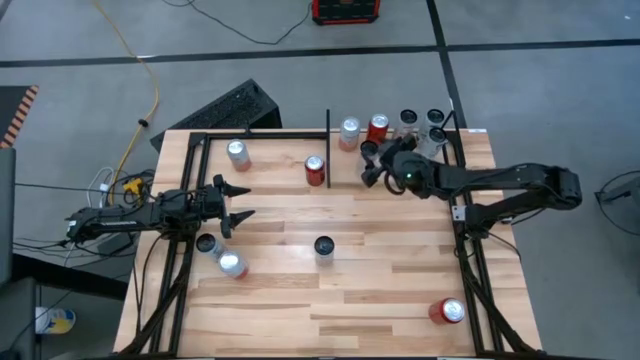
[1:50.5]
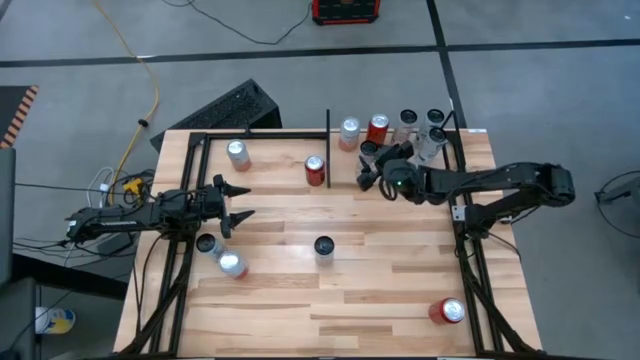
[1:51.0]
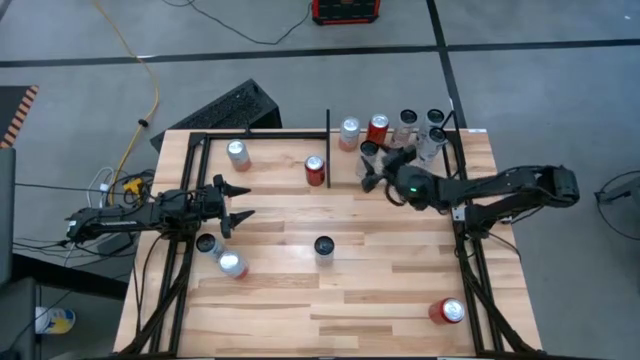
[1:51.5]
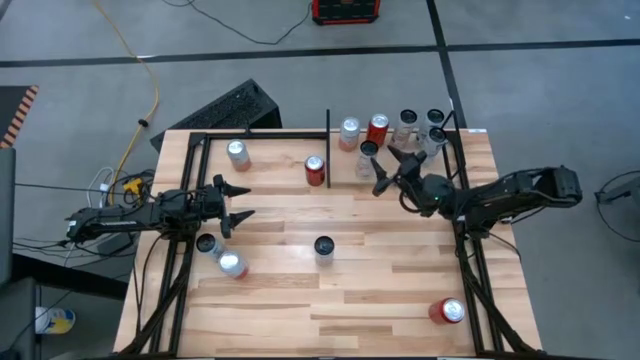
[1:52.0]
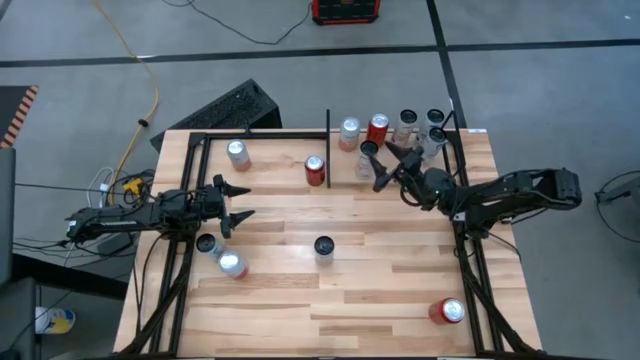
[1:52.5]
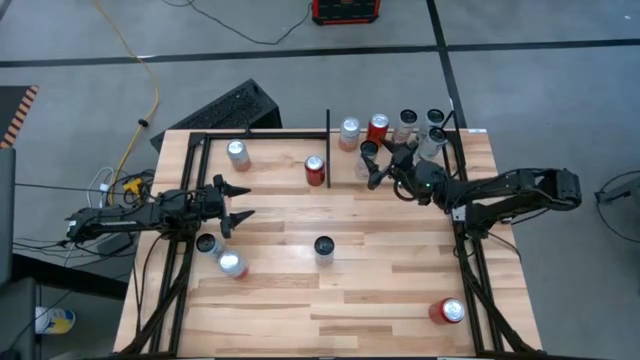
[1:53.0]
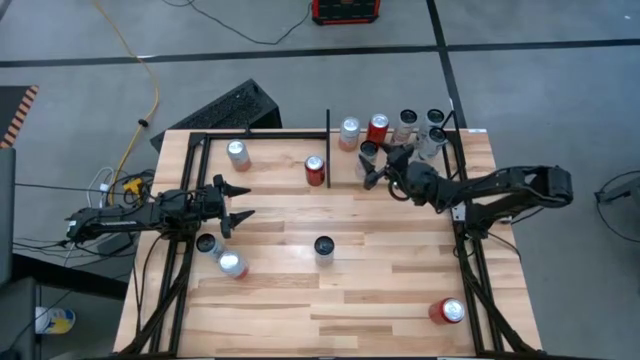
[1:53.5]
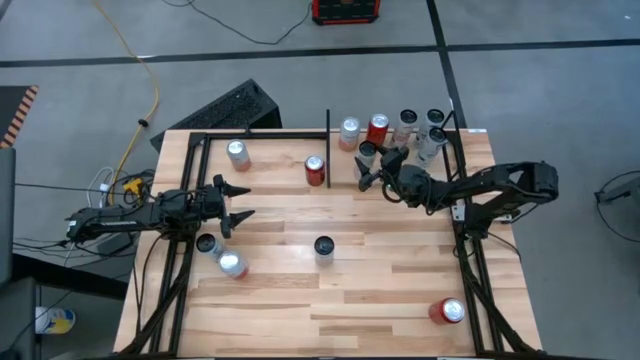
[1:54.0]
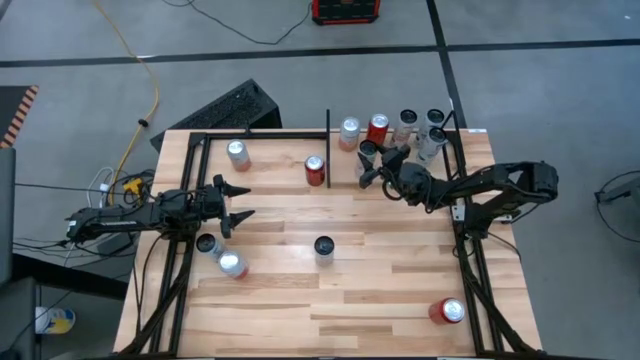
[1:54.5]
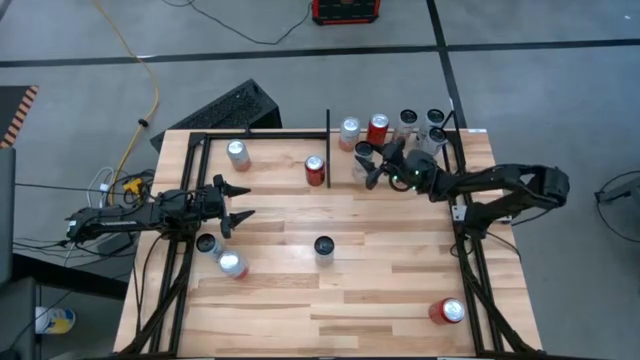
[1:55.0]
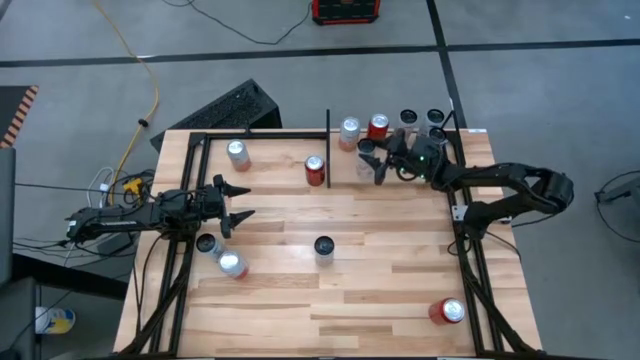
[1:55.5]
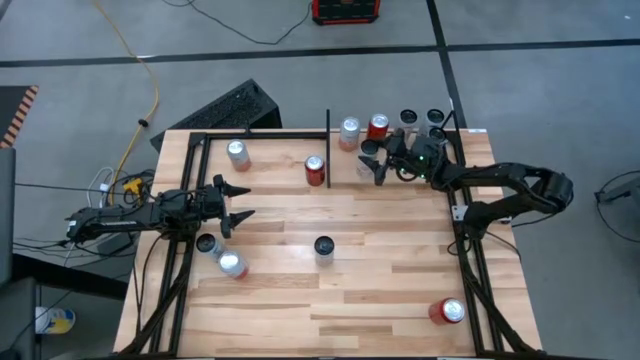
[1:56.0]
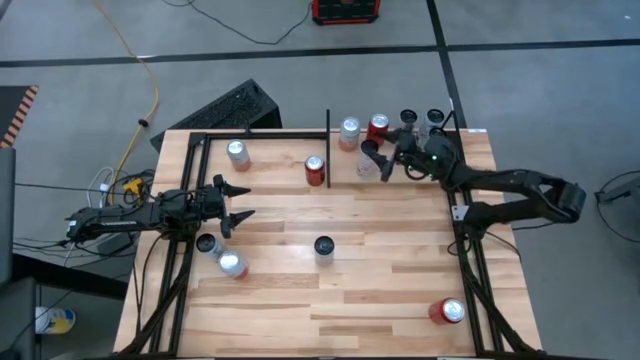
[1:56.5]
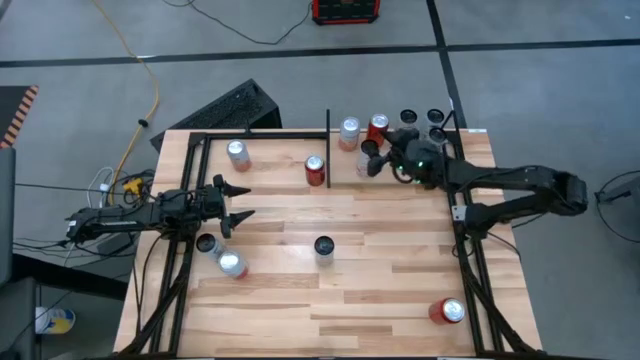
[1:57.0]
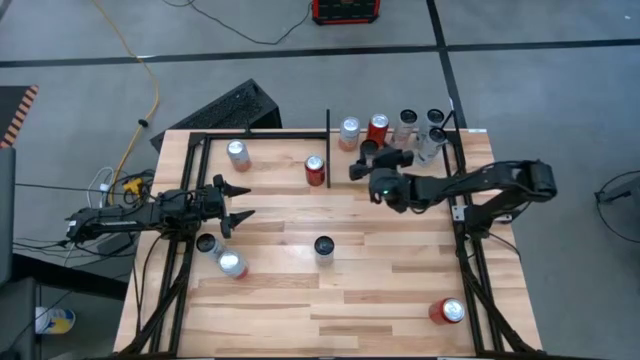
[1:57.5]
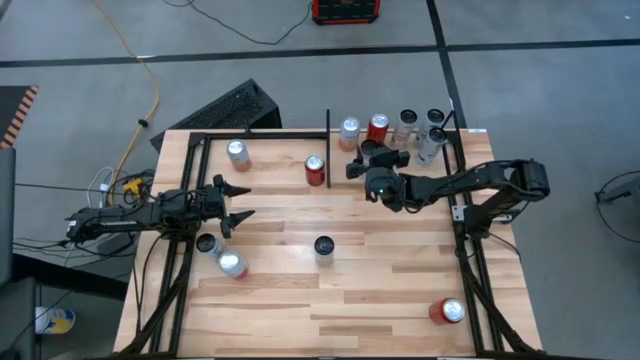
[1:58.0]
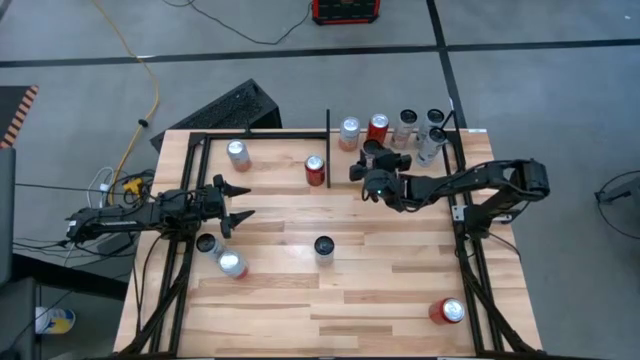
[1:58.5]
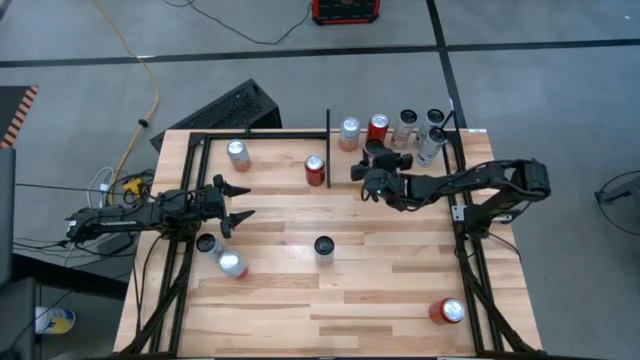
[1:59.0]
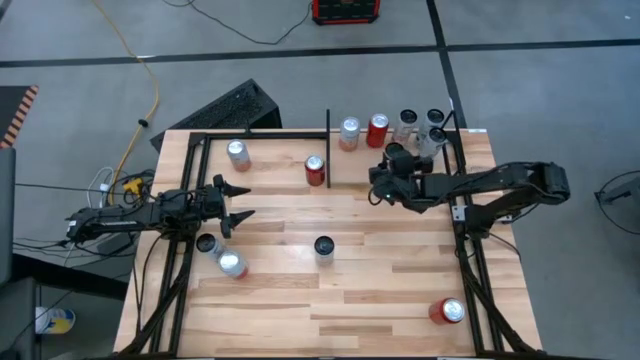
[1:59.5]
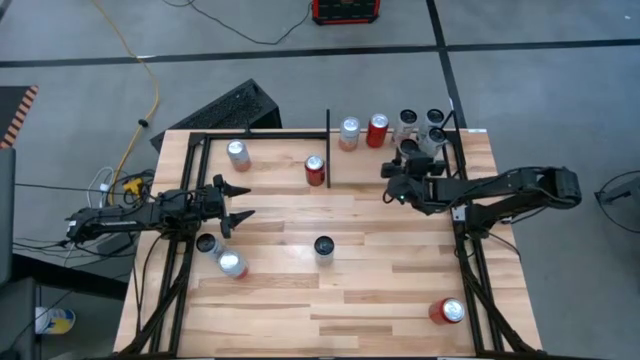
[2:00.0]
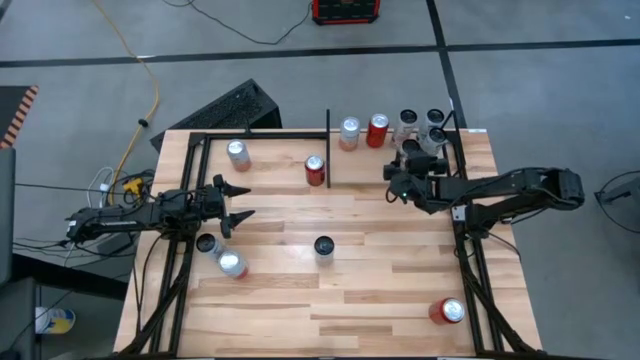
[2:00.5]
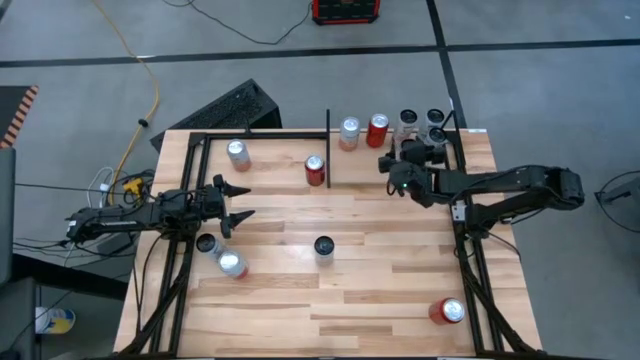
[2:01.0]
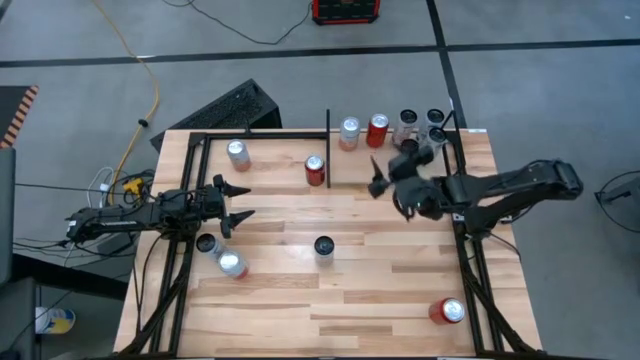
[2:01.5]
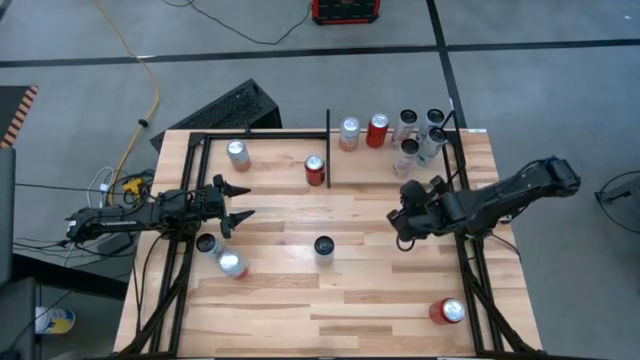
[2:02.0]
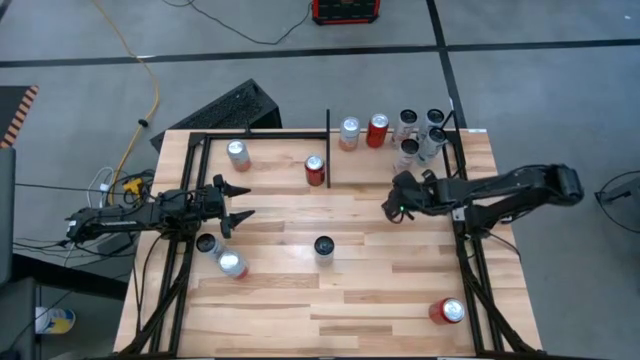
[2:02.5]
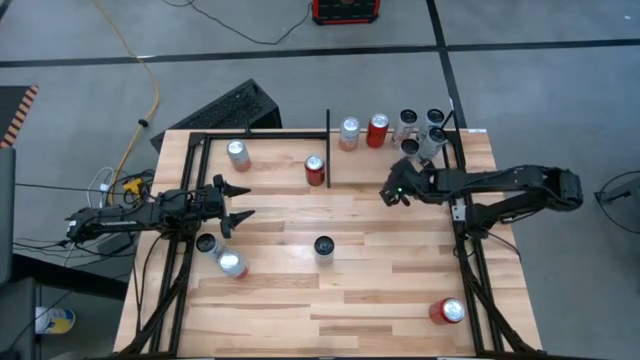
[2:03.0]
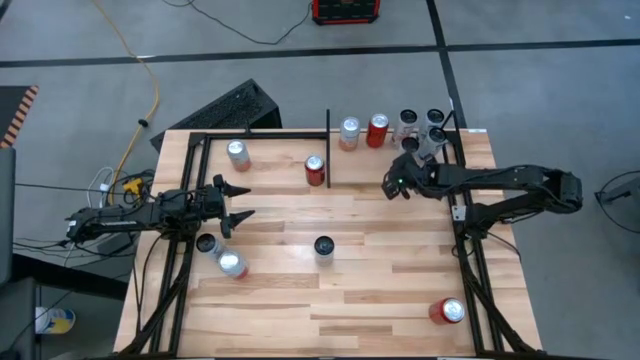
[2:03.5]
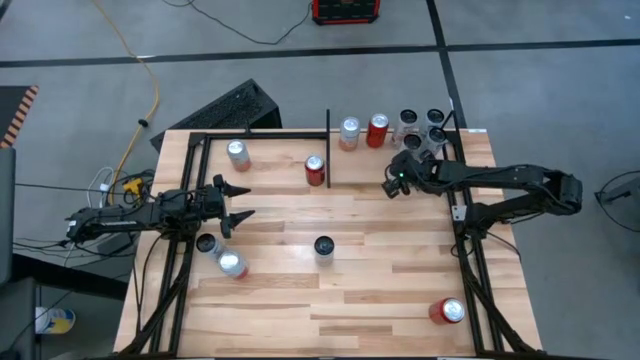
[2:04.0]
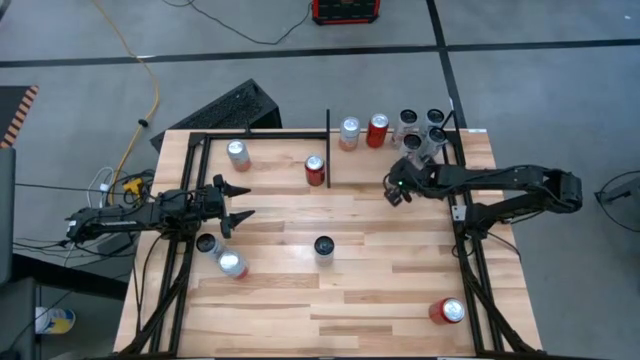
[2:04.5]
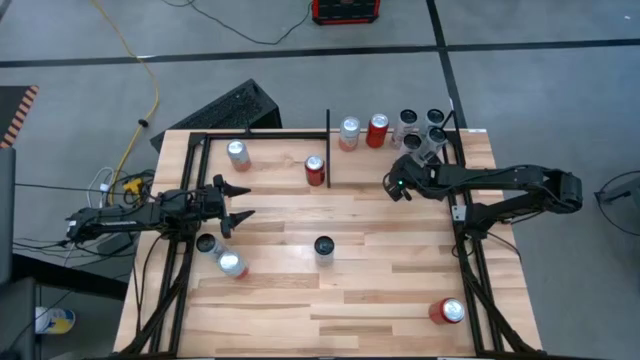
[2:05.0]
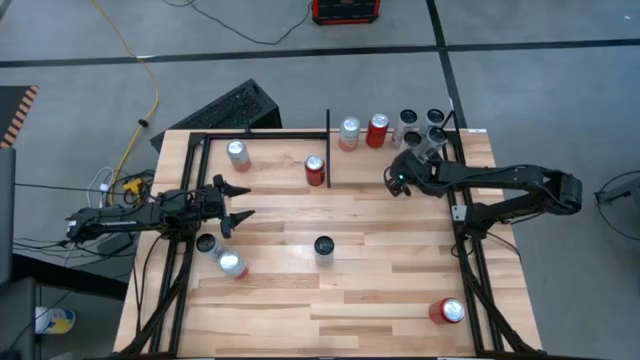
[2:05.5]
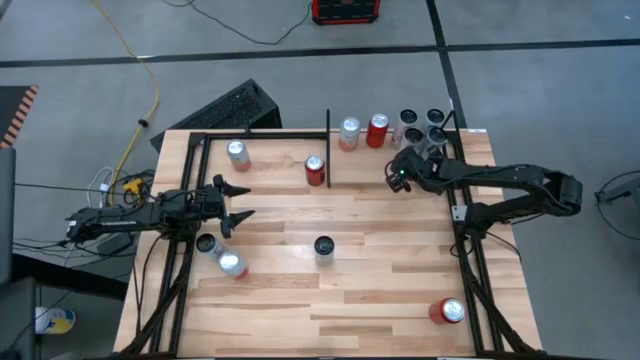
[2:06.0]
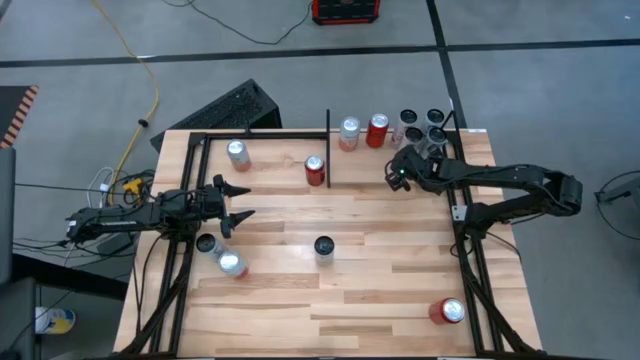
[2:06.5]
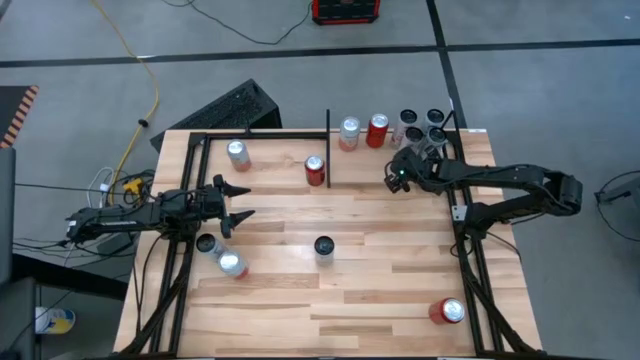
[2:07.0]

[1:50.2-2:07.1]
Task: Place canned beverage on shelf
Put the black pink soda can on the shelf

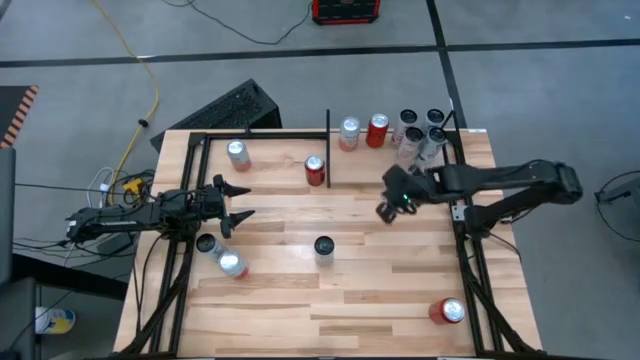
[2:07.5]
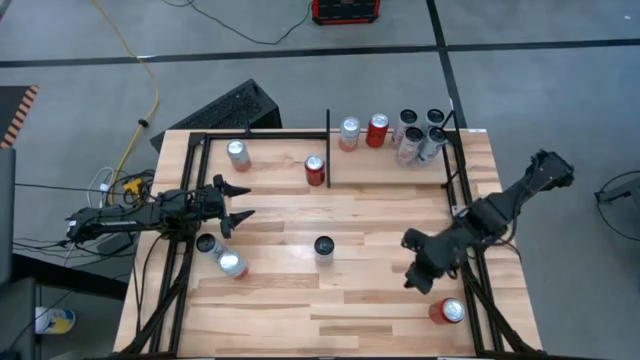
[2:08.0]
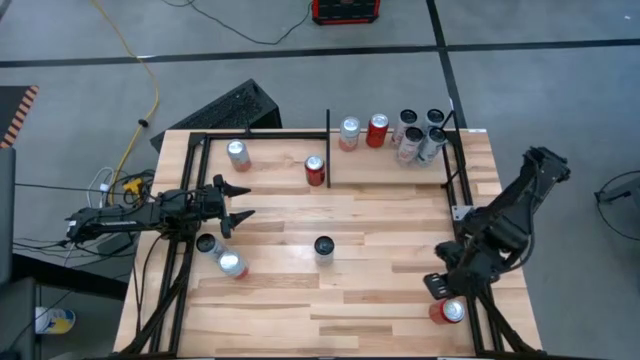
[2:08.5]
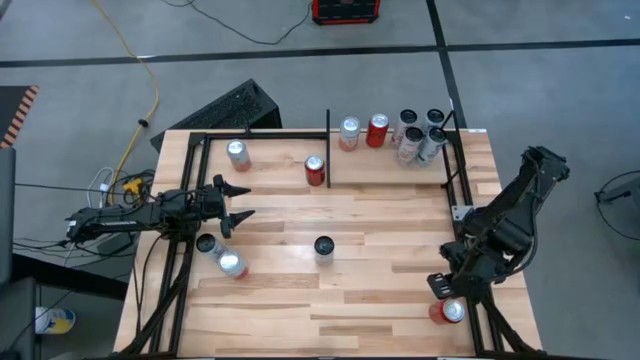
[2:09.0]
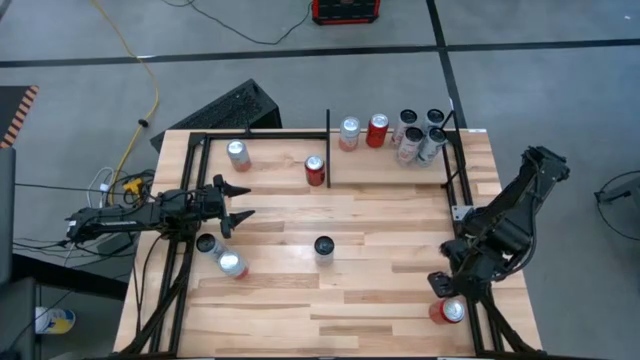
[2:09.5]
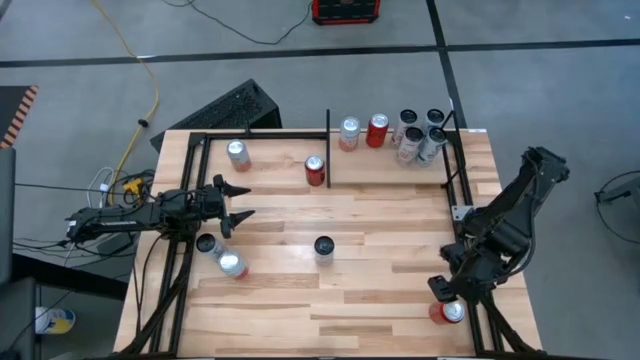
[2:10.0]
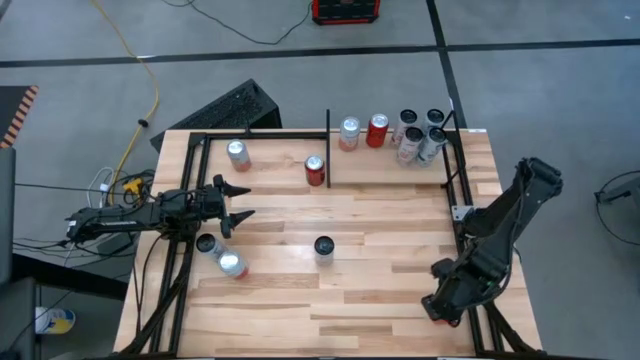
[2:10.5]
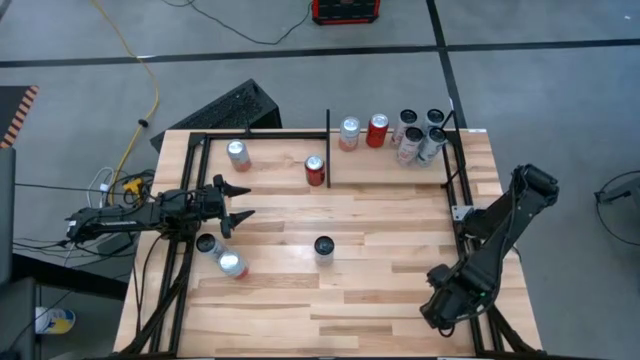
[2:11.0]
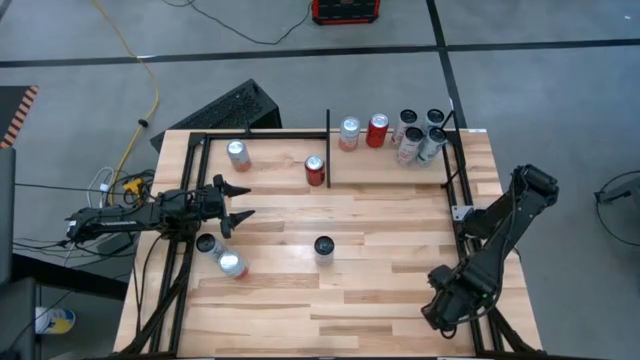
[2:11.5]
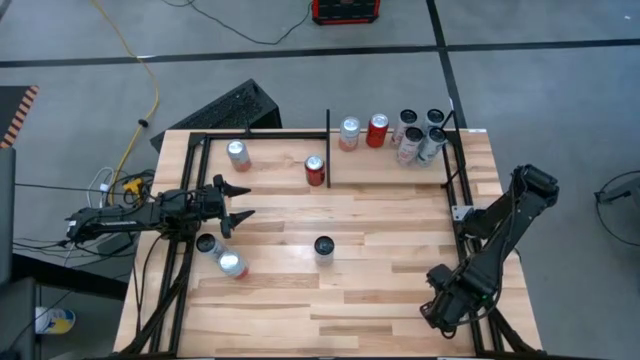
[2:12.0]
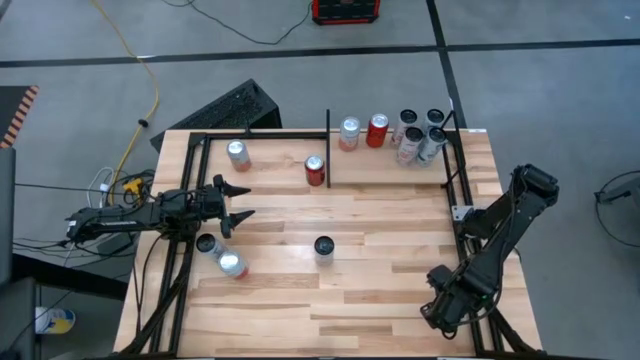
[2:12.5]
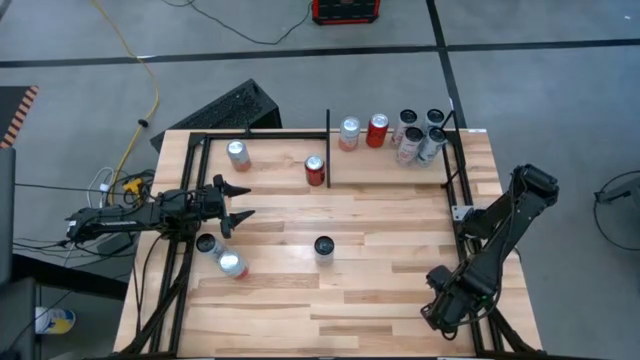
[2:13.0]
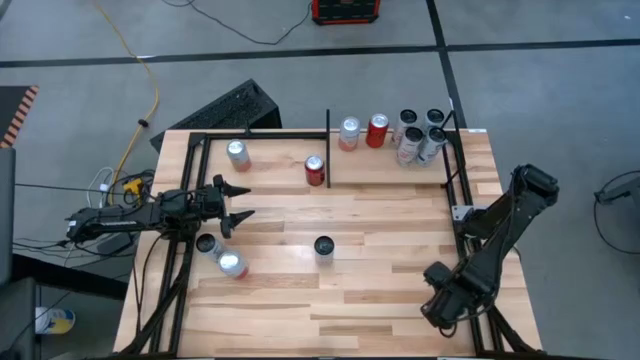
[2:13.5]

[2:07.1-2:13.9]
Put the red soda can on the shelf
